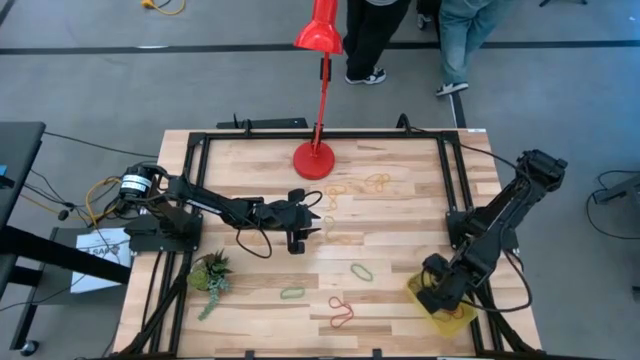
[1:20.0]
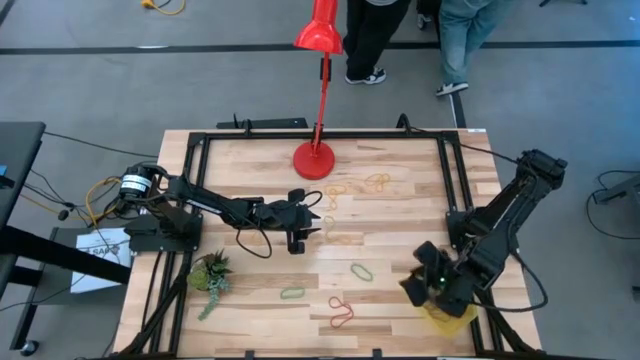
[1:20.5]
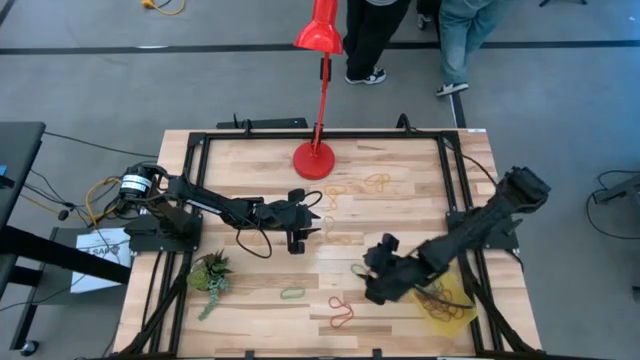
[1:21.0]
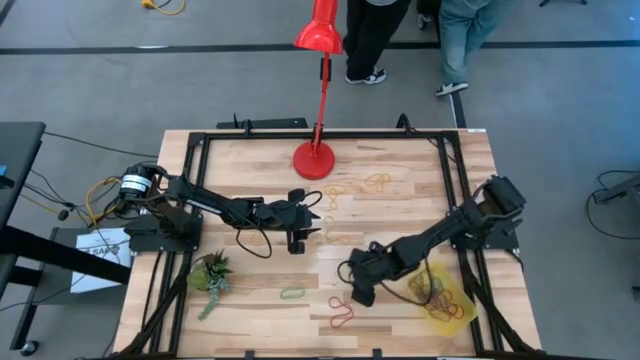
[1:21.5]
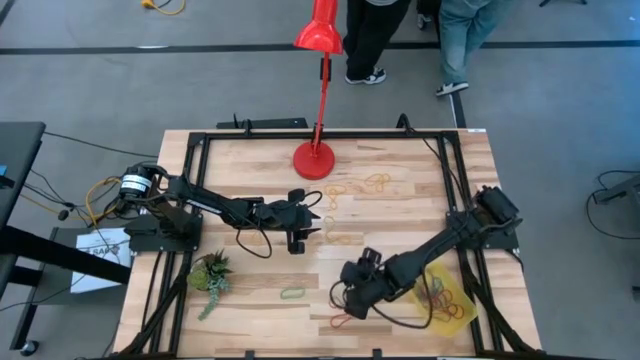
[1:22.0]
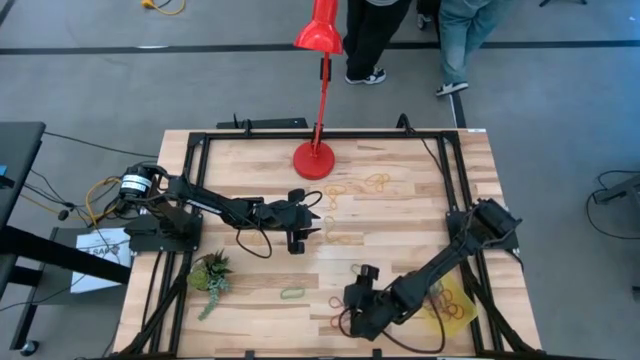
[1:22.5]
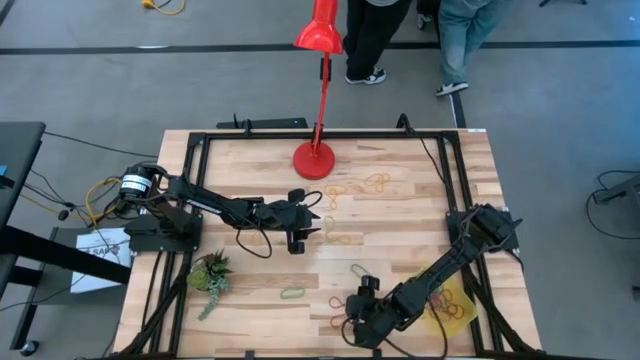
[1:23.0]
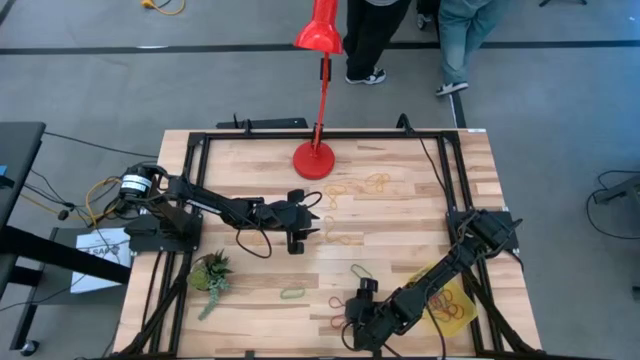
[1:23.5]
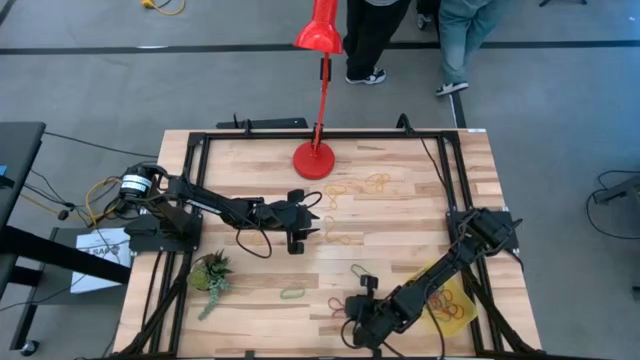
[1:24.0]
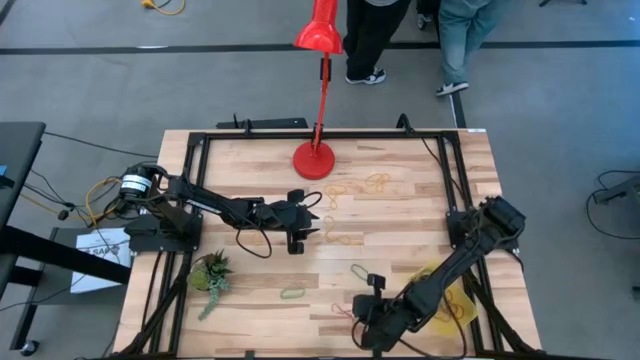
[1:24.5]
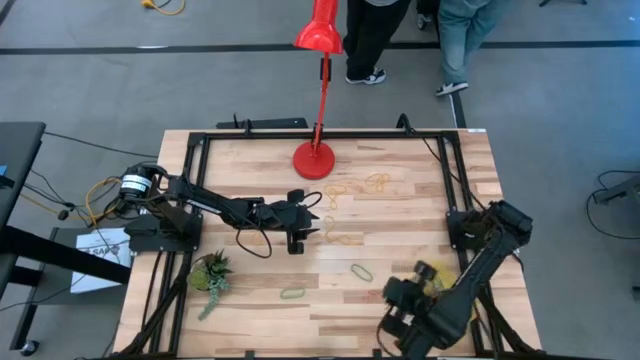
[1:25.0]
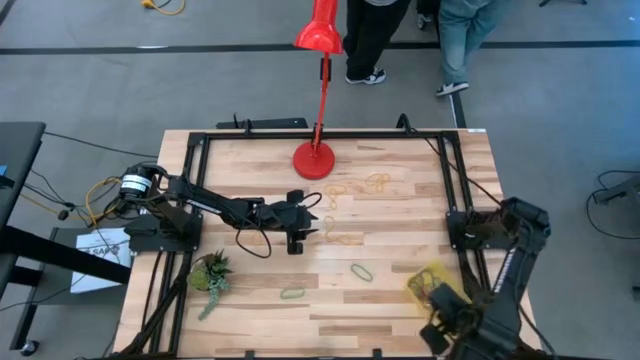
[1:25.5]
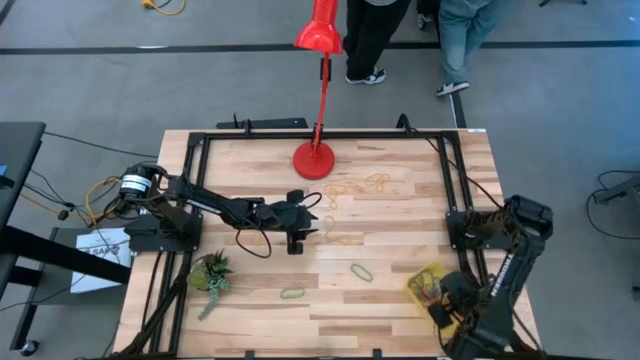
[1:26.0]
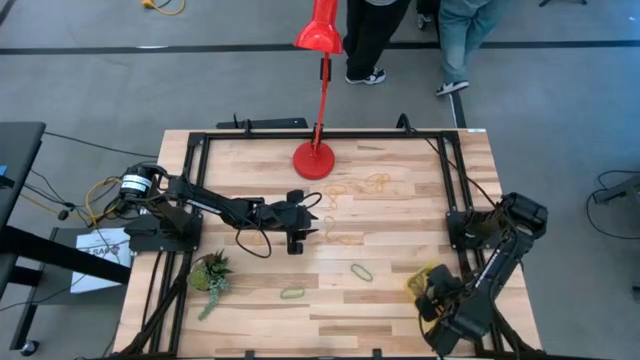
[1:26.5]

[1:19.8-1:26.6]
Task: Pick and place rubber bands into bin
Put the red rubber band into the container

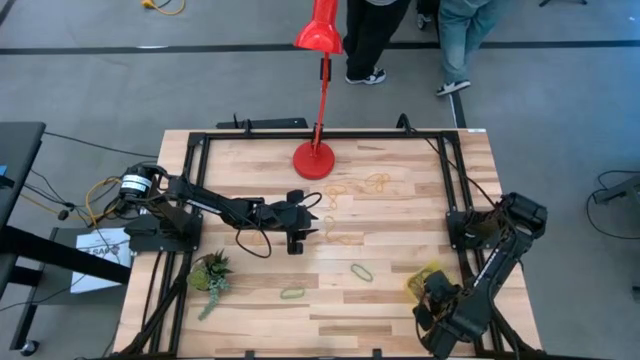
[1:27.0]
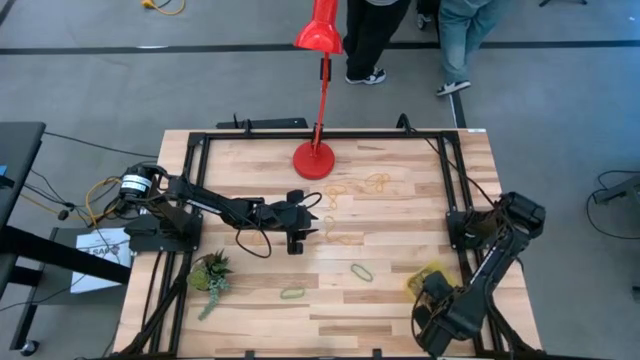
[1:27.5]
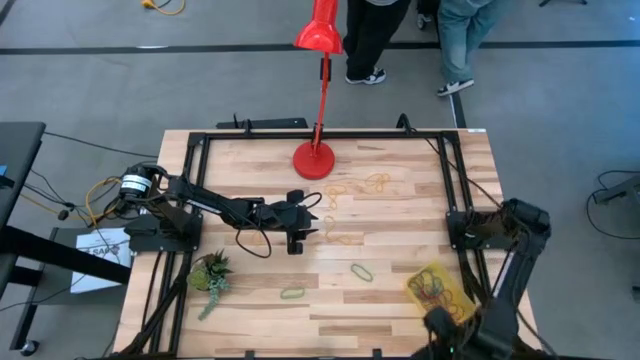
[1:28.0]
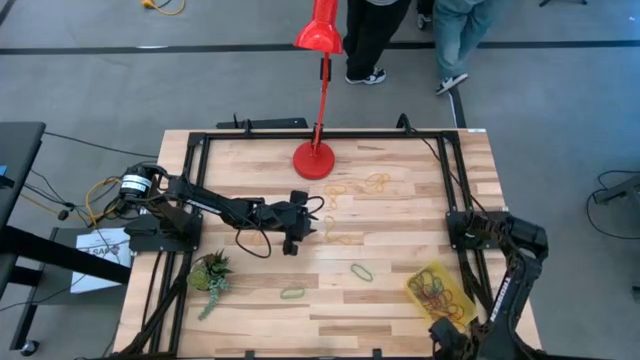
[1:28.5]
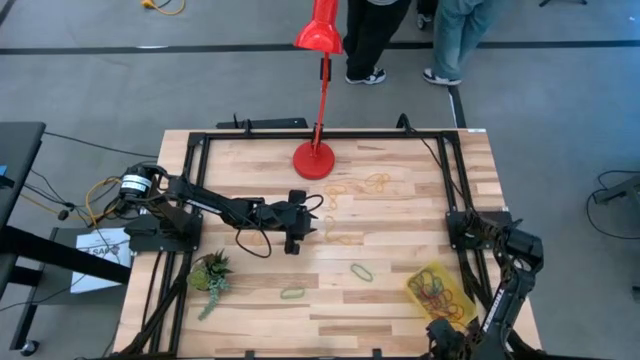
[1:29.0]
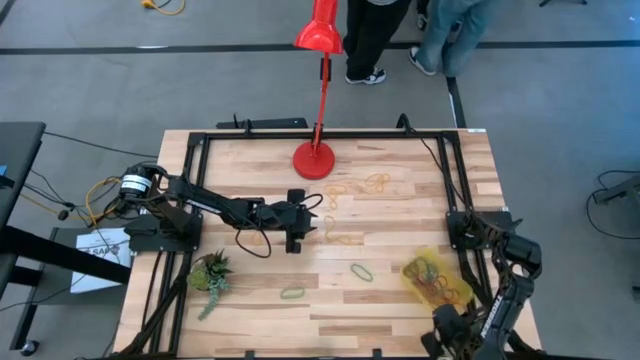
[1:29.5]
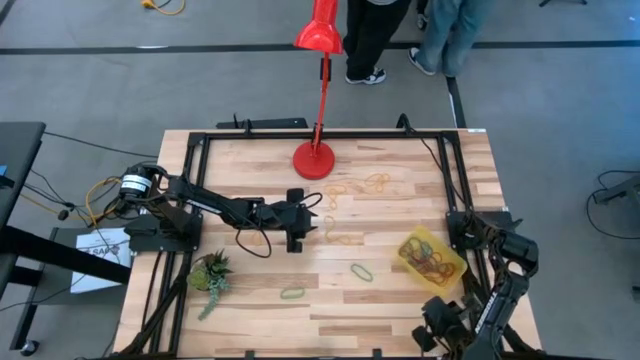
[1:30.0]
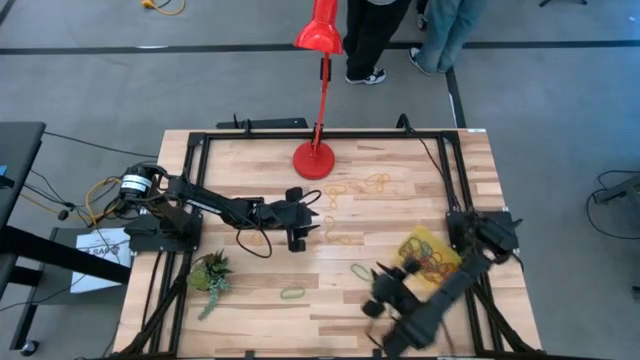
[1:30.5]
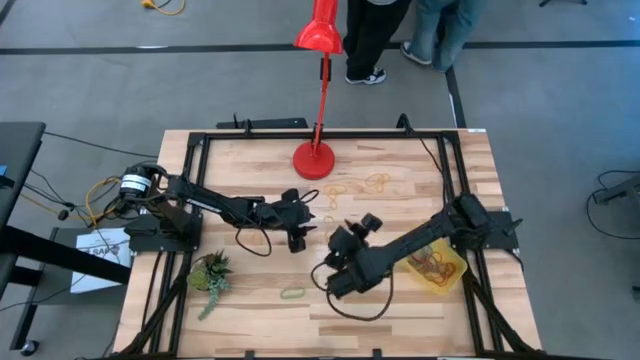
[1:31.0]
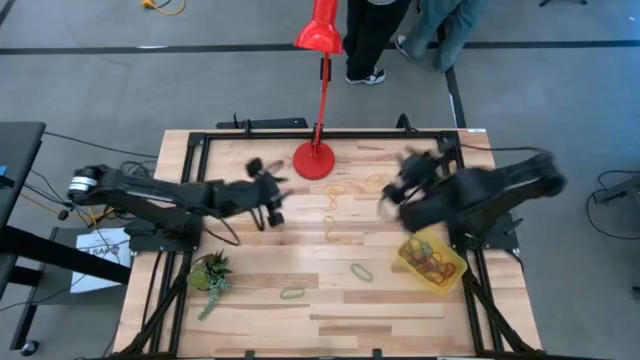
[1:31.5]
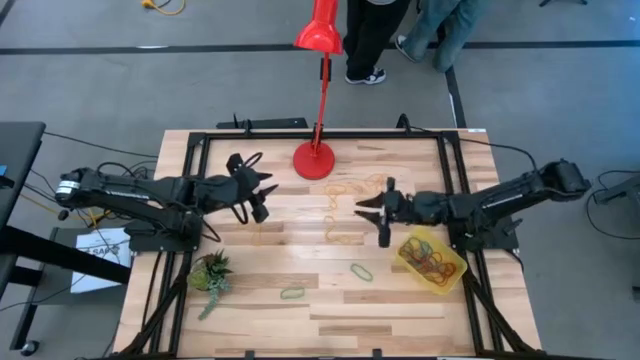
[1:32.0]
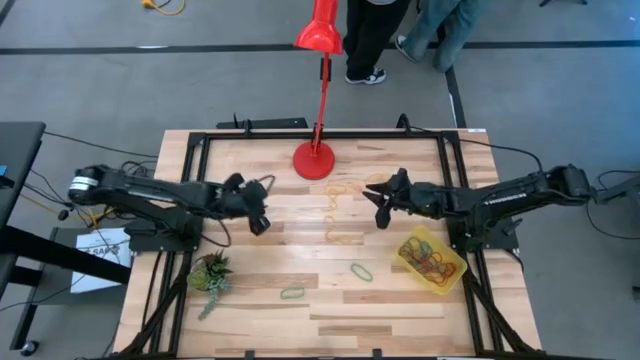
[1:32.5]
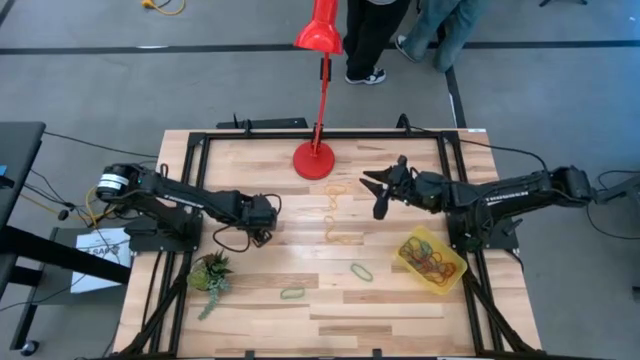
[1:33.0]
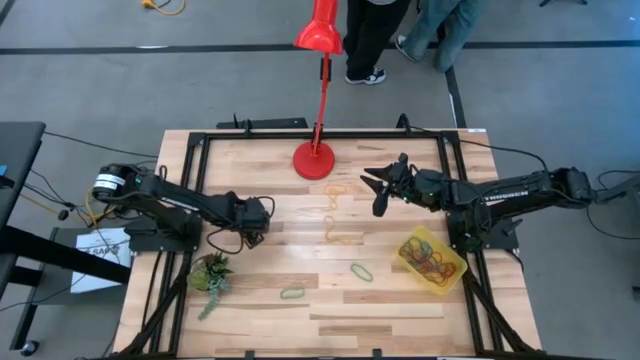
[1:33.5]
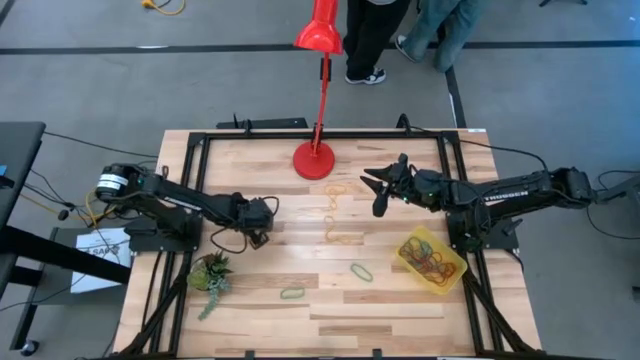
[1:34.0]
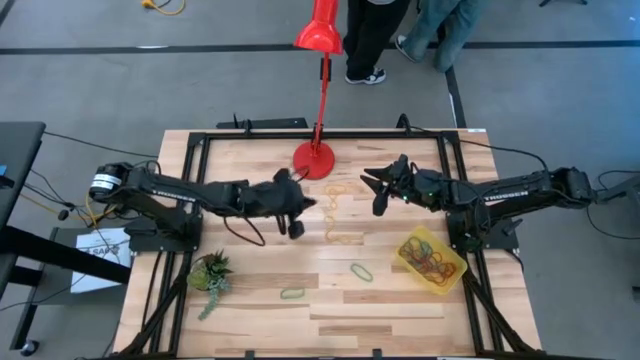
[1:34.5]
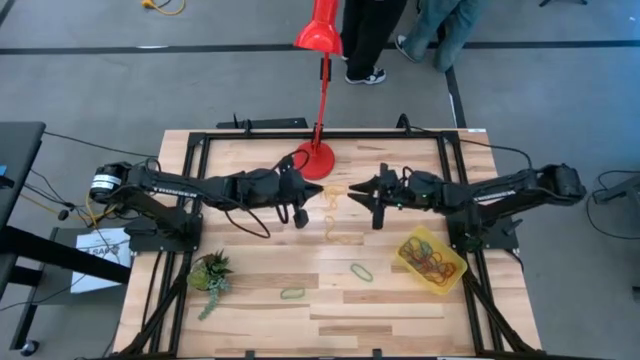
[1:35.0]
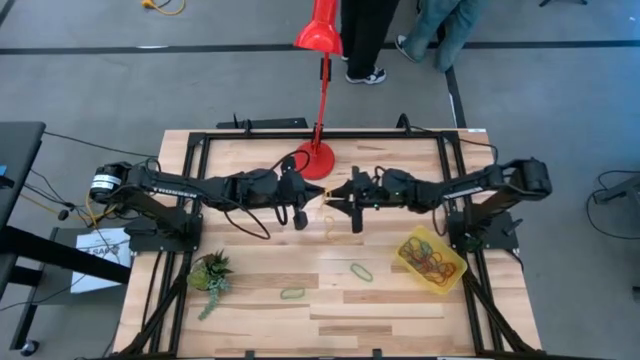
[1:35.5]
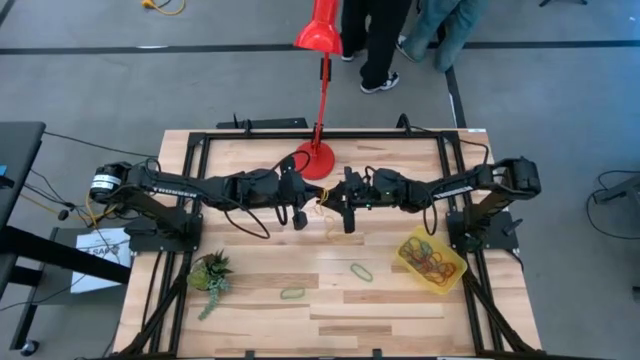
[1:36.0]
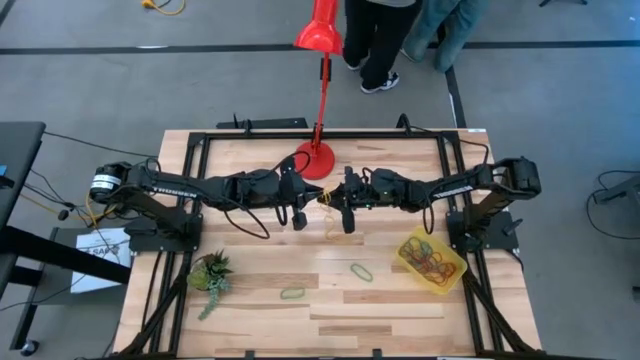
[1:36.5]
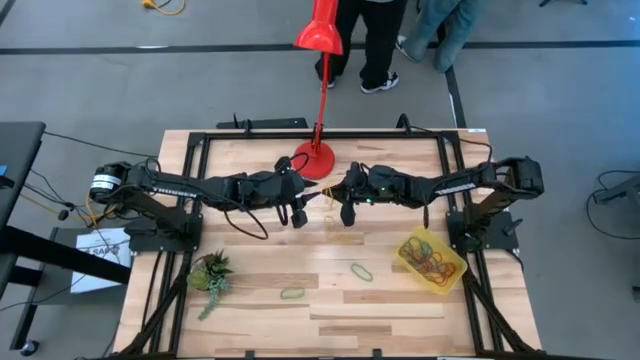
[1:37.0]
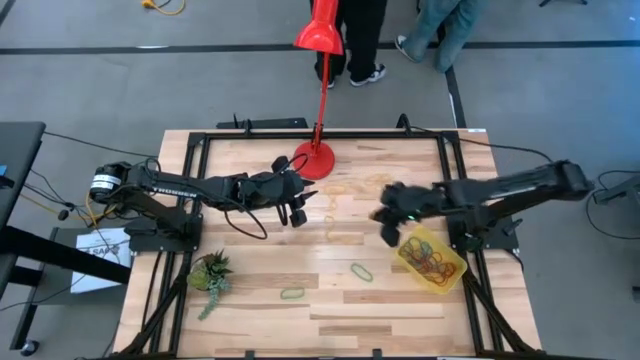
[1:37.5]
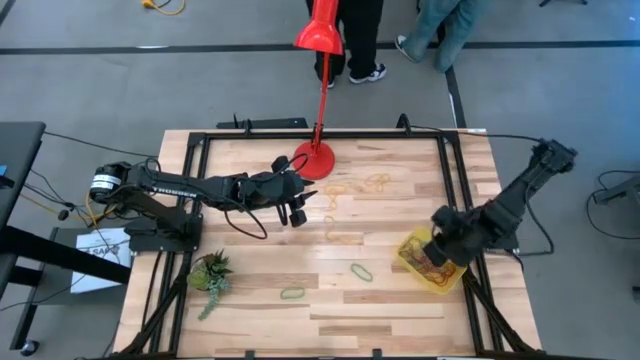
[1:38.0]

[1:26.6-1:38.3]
Put the yellow rubber band into the container

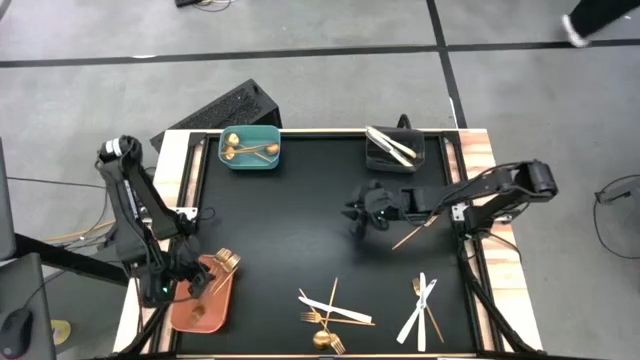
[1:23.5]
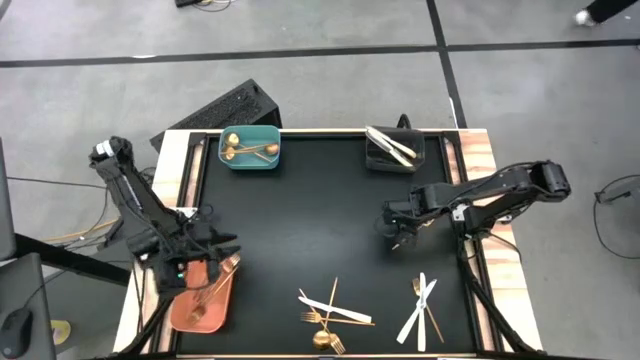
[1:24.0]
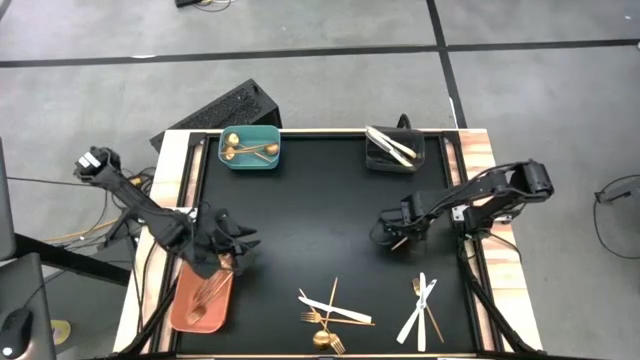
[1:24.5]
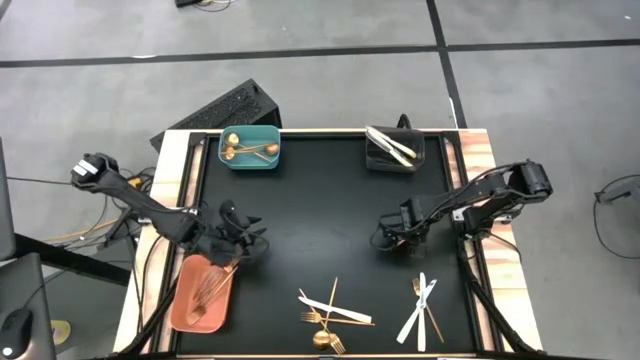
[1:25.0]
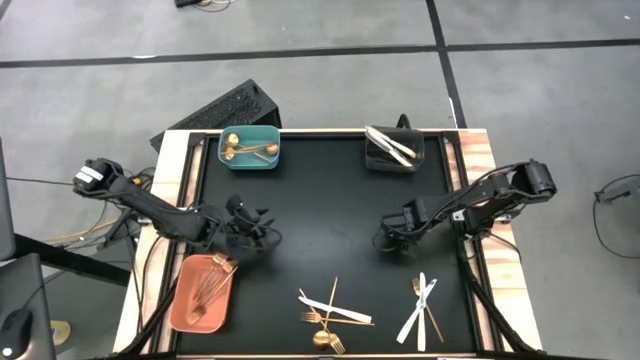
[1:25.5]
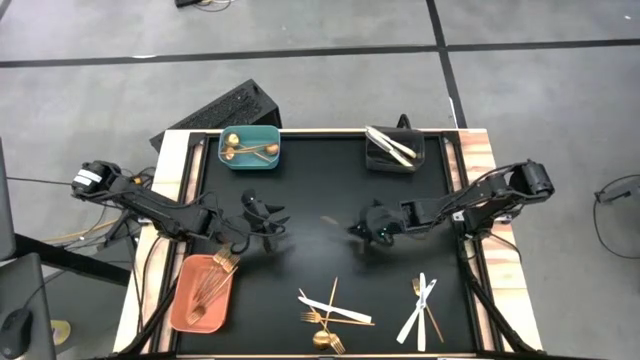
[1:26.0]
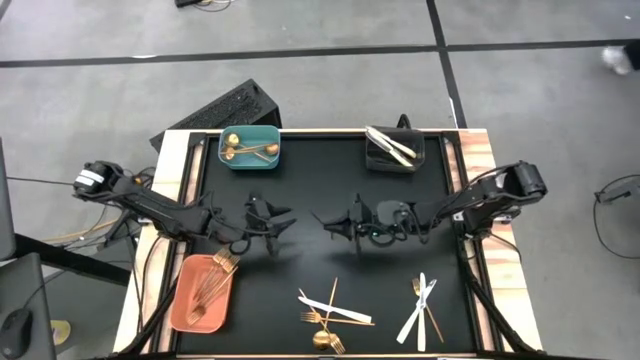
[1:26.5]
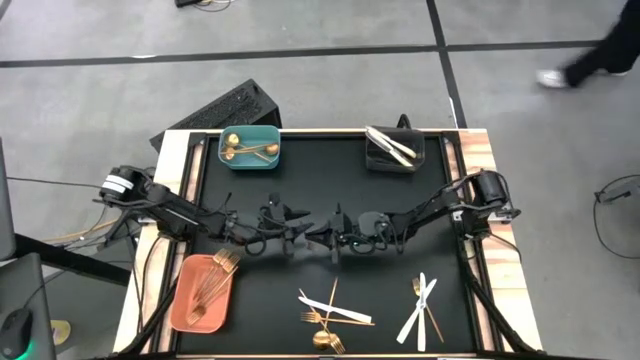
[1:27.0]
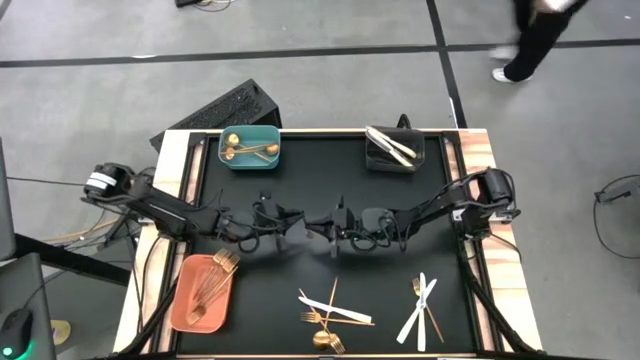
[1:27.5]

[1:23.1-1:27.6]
Task: Sort silverware by color (type)
Put the gold fork into the orange bin
